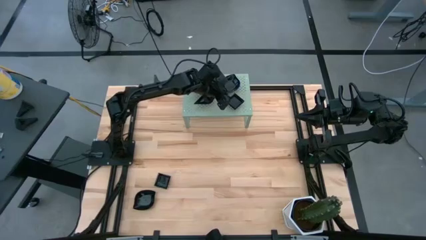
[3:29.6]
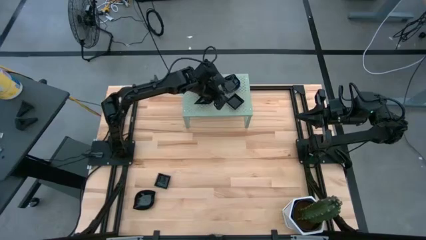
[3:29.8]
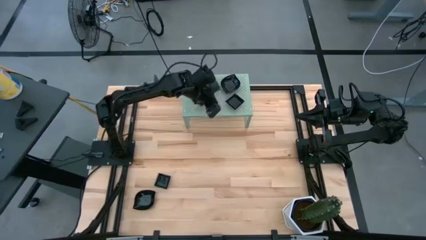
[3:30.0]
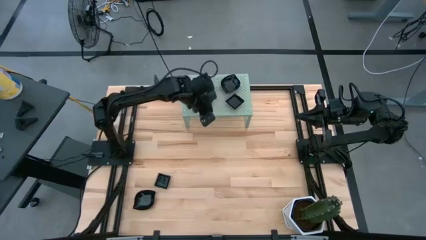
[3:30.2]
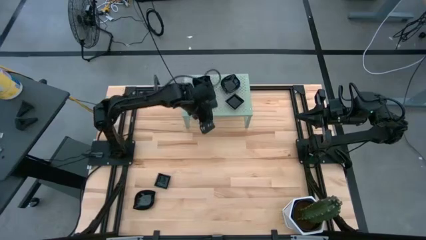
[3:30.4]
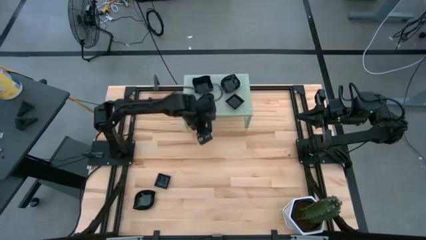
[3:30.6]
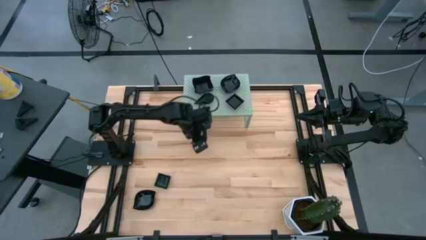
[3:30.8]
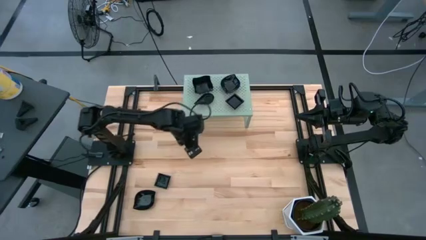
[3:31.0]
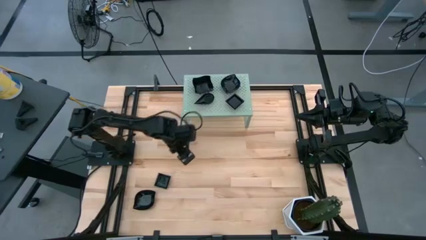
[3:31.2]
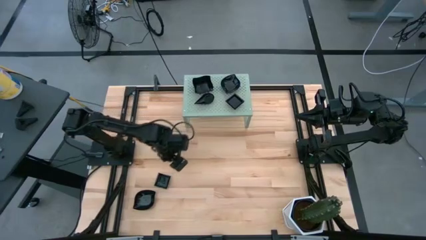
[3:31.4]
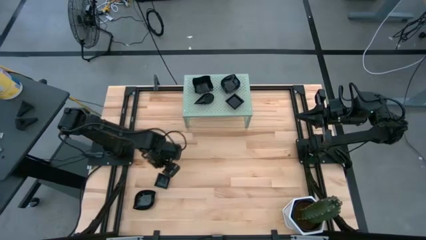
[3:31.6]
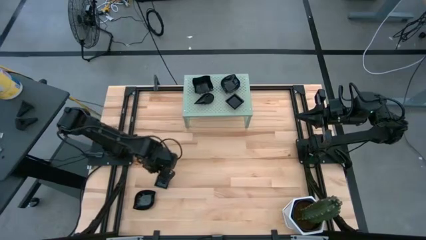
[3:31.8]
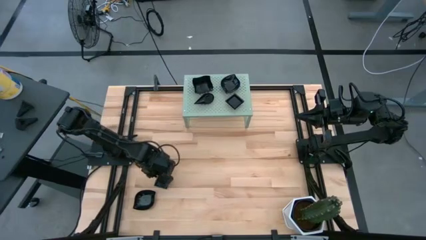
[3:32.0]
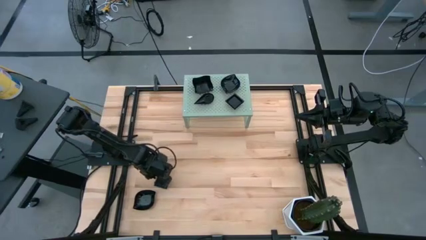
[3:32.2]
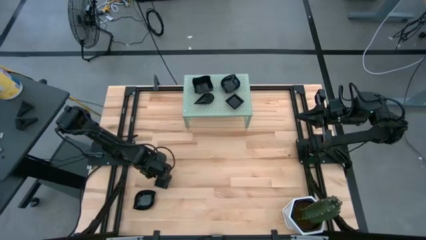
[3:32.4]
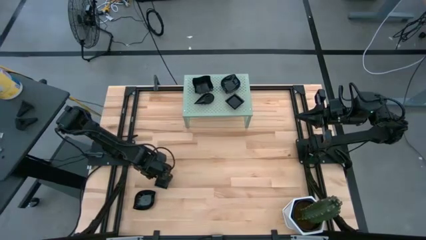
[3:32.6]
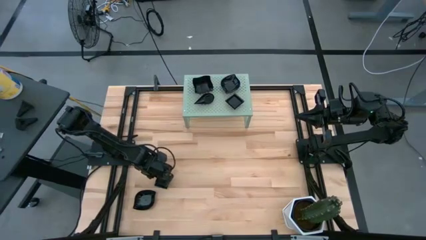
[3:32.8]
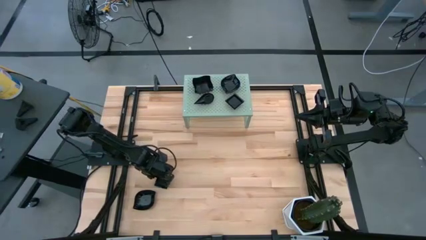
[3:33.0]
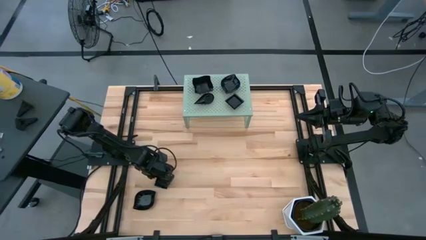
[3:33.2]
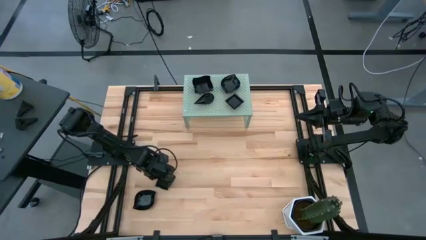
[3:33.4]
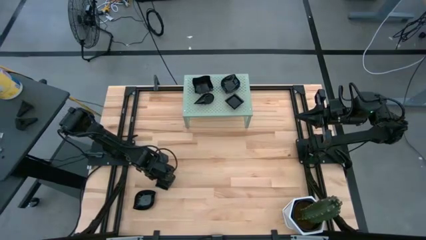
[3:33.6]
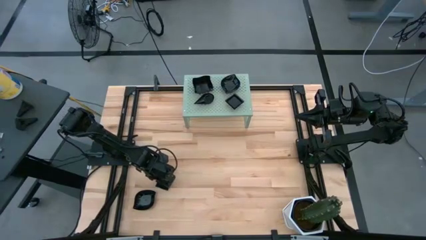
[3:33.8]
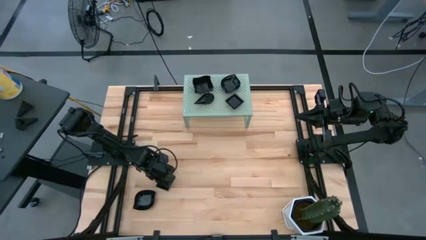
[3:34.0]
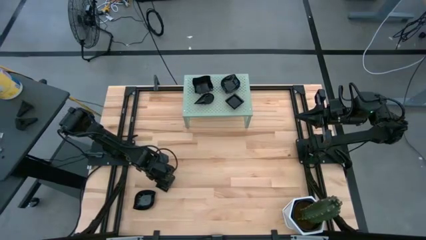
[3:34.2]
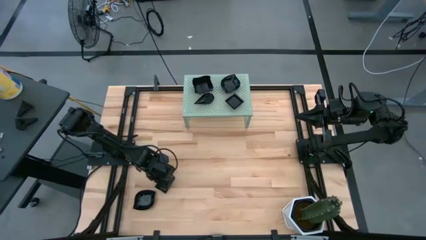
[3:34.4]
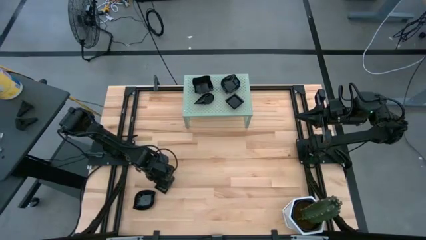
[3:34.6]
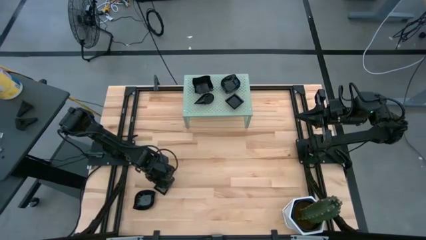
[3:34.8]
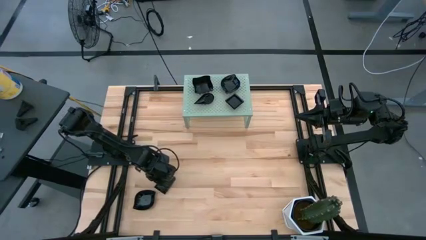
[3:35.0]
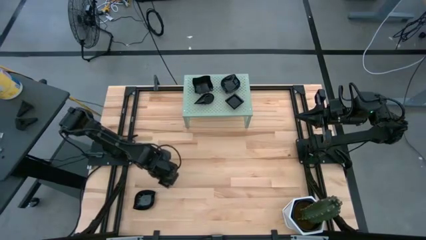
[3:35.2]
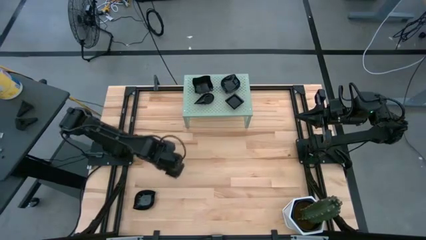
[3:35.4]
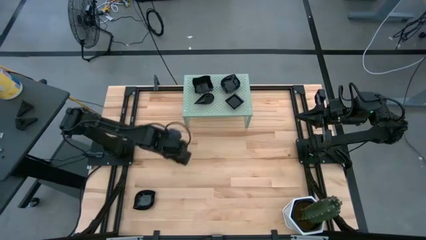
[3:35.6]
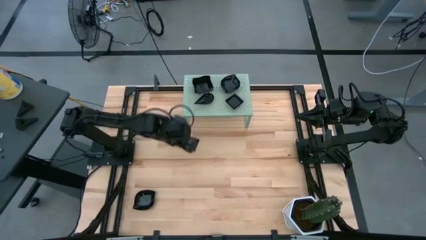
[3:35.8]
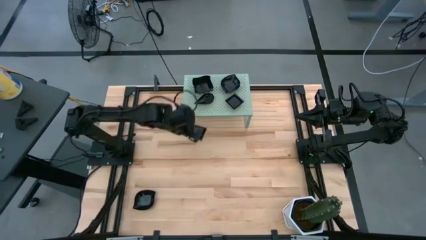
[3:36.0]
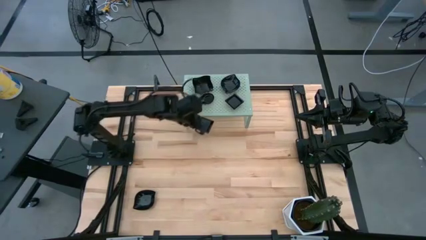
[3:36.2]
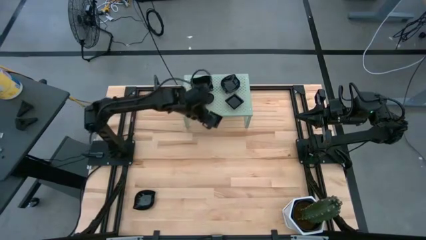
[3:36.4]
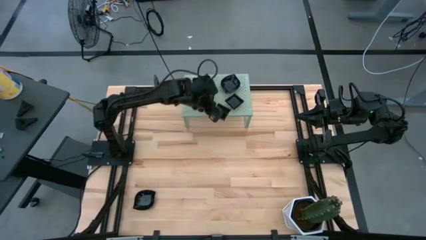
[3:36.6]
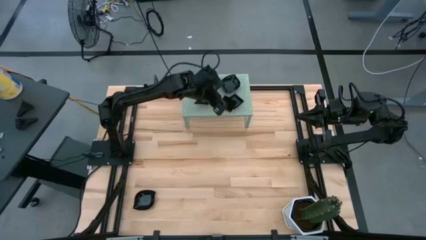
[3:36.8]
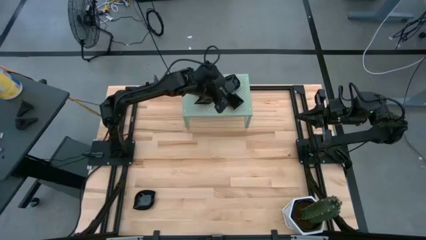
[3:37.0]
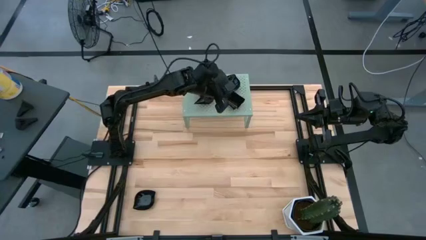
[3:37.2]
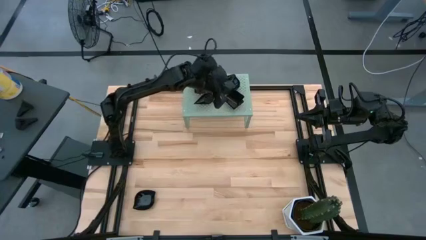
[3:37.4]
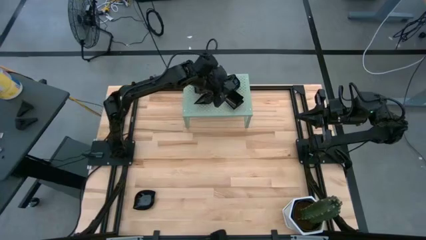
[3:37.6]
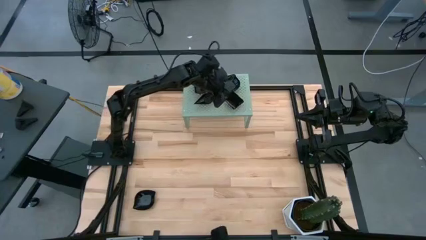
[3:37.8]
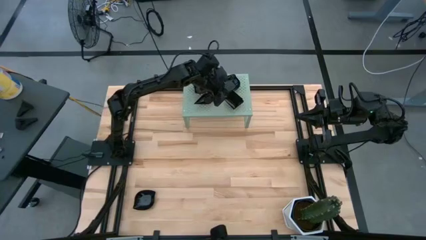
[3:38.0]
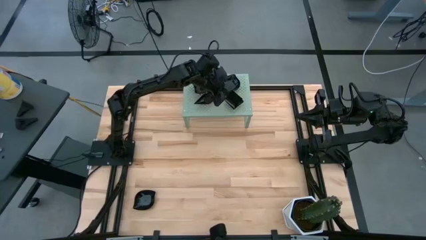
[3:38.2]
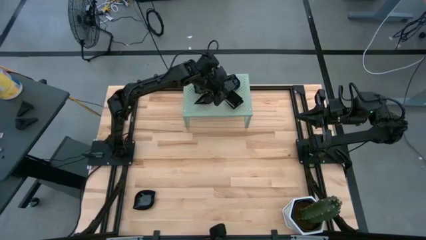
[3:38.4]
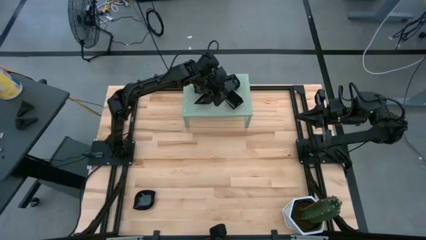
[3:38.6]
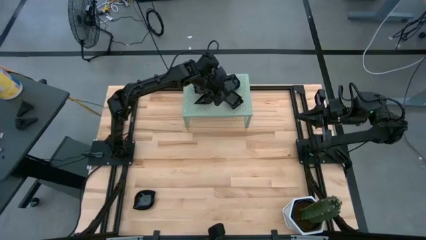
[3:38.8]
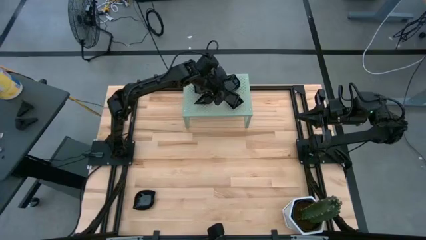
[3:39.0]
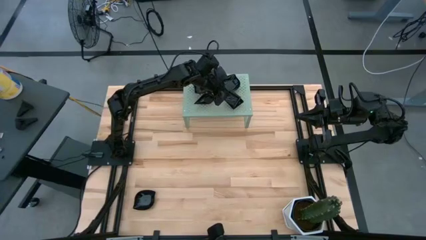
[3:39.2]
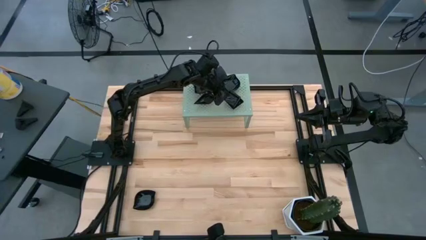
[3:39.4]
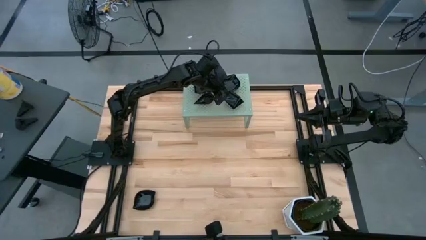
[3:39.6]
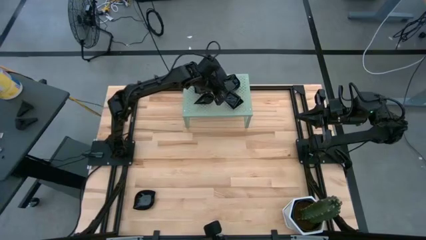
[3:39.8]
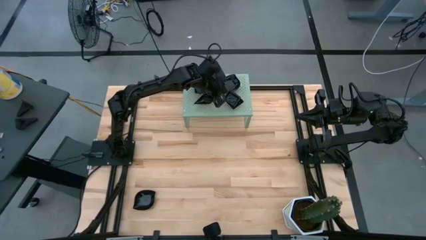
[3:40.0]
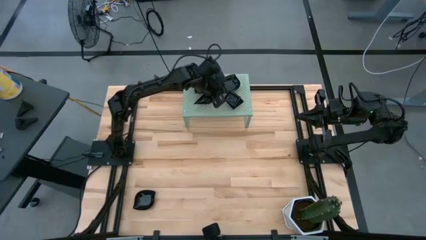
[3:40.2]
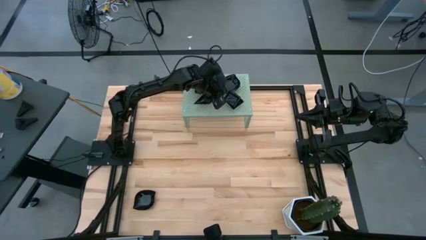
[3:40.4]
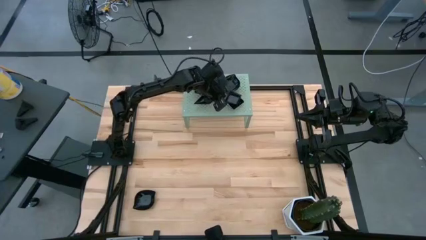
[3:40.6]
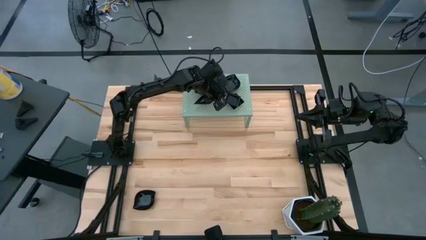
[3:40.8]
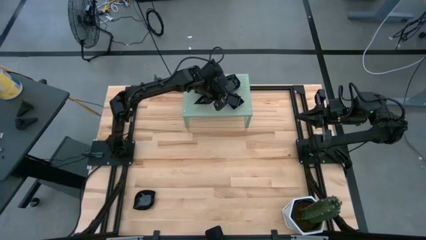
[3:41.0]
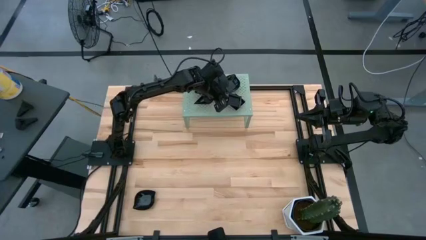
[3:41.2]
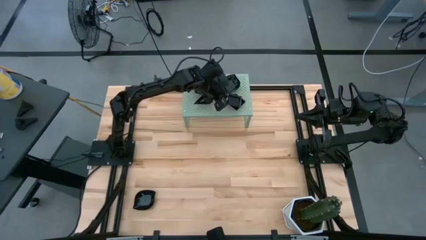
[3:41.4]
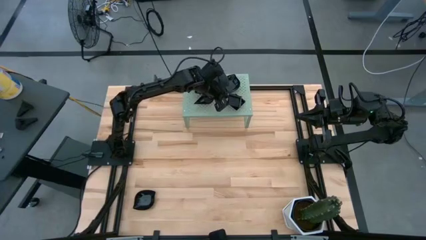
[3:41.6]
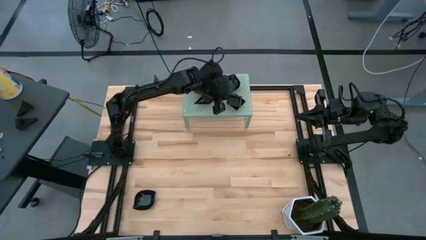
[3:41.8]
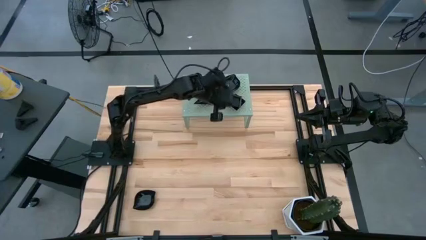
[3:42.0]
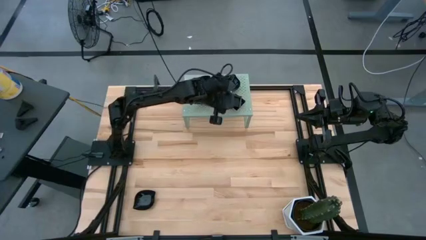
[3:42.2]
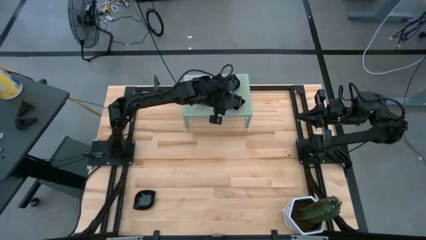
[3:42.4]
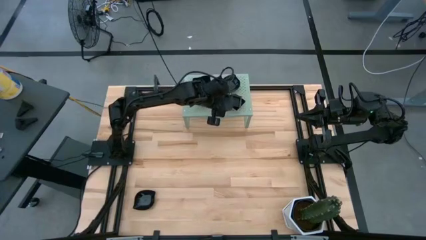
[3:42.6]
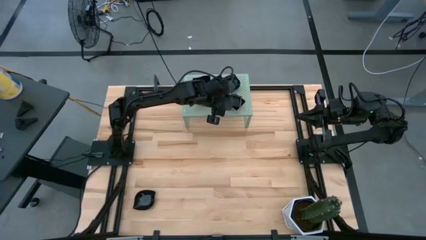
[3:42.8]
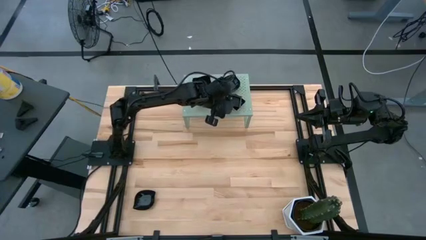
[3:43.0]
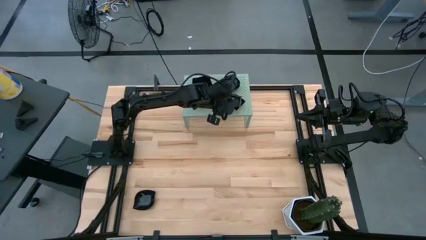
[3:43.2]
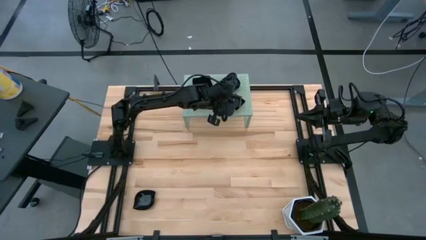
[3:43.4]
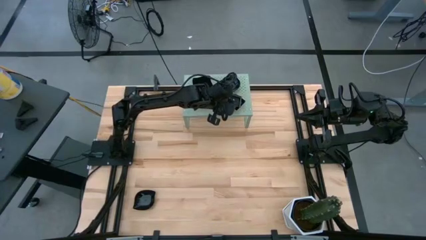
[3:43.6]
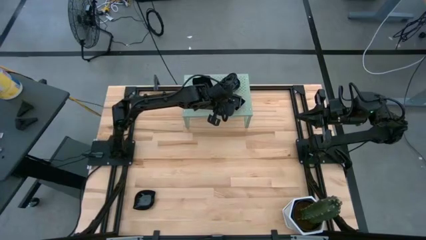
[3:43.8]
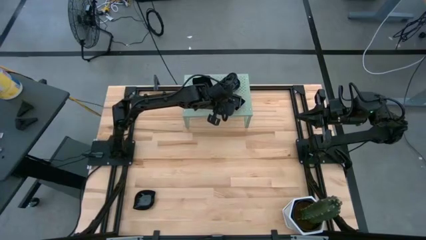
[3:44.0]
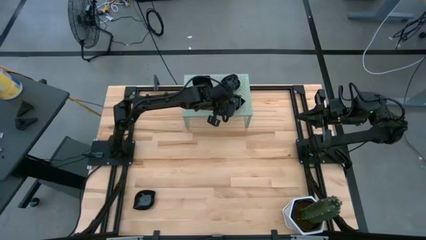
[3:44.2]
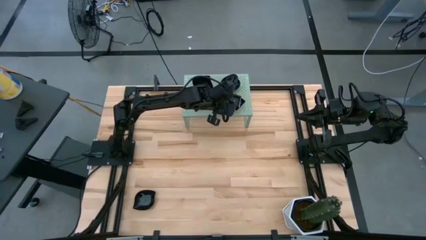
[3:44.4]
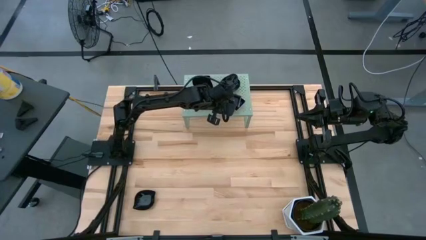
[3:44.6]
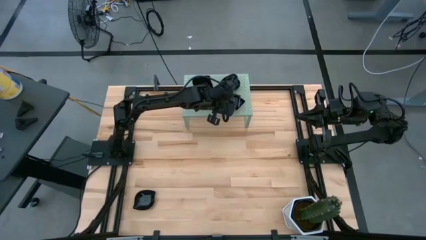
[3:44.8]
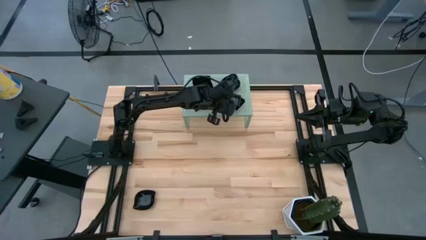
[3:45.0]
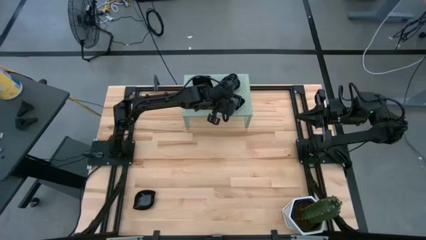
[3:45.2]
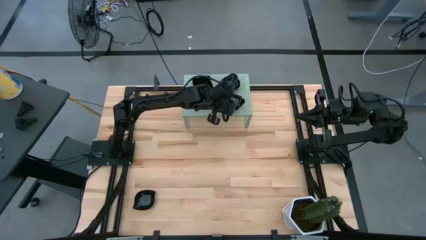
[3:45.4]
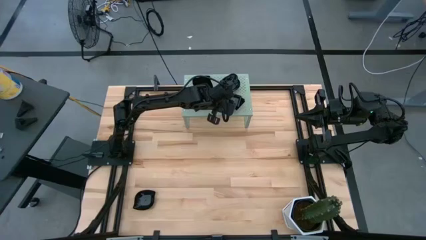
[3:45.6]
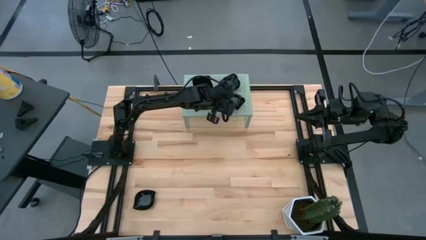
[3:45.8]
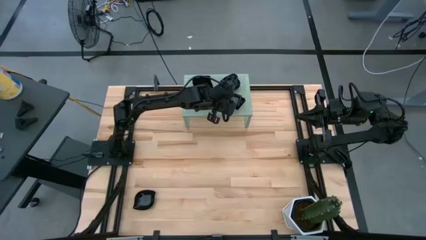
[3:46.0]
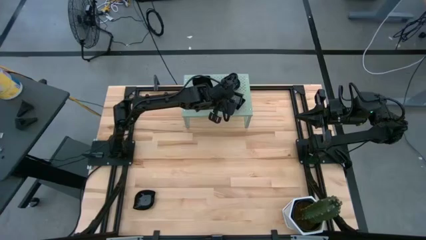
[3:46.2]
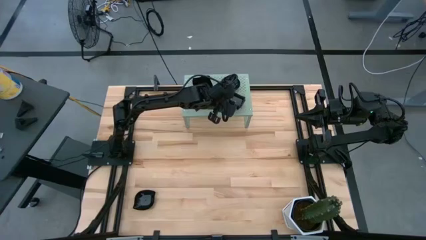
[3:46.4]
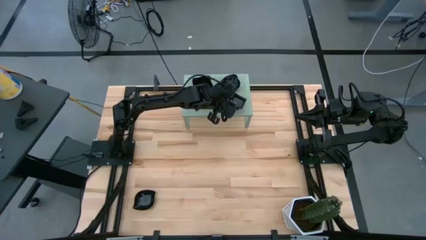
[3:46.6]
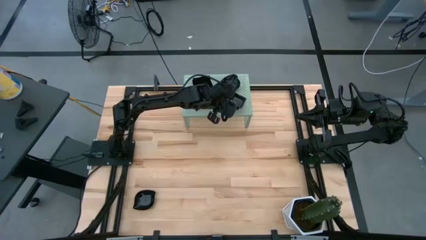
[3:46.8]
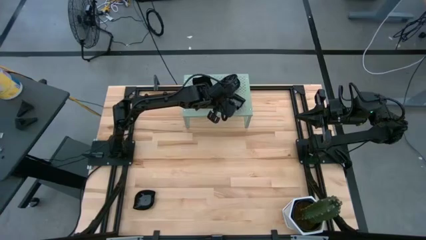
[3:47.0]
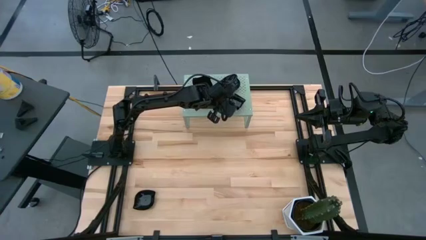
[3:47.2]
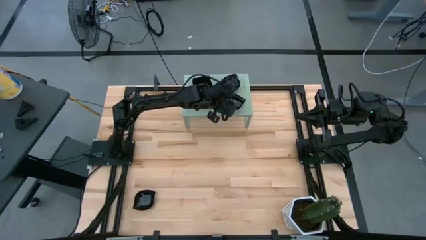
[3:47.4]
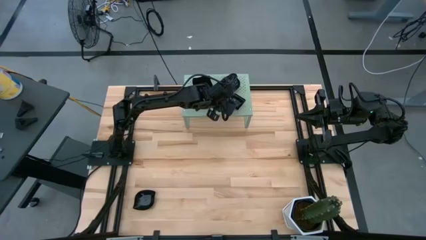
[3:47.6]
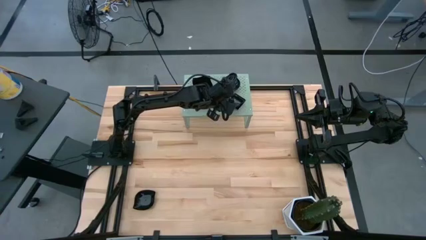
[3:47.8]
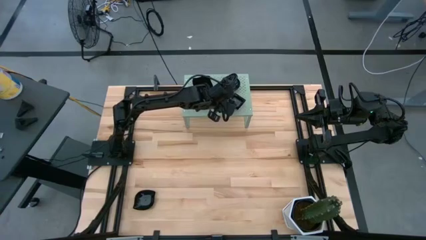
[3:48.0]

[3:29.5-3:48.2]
Task: Pick & Place Mini shaped plates
Stack the square plate on top of the square plate on the shelf
